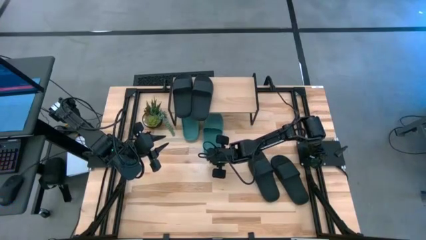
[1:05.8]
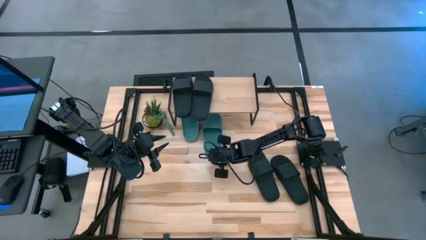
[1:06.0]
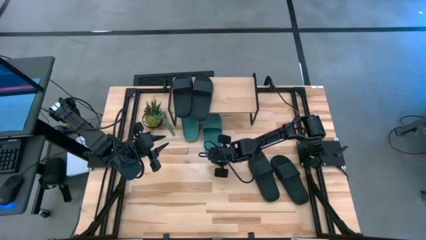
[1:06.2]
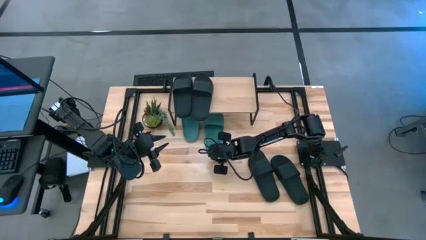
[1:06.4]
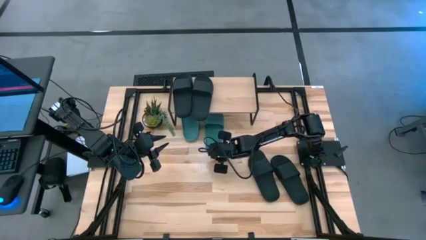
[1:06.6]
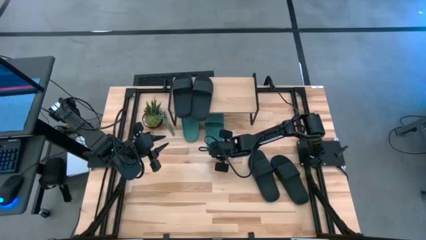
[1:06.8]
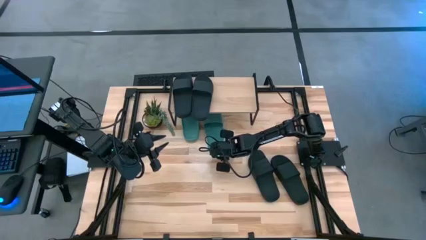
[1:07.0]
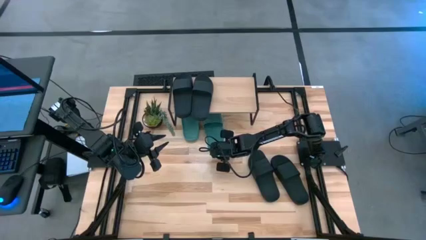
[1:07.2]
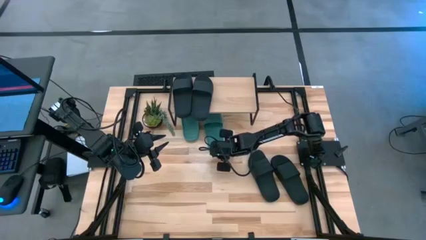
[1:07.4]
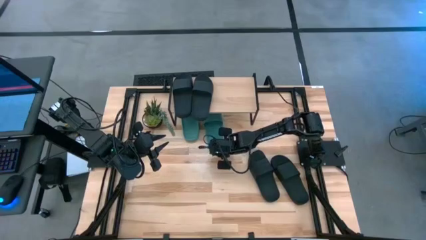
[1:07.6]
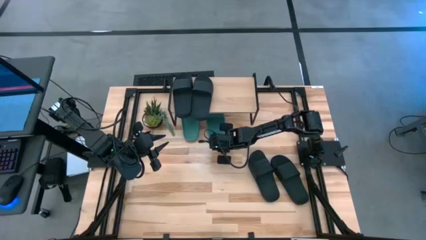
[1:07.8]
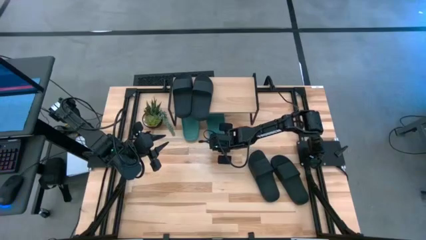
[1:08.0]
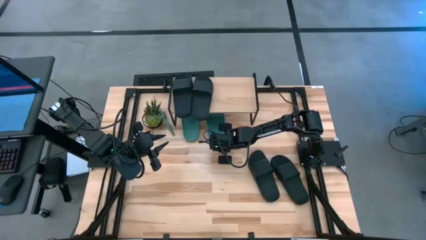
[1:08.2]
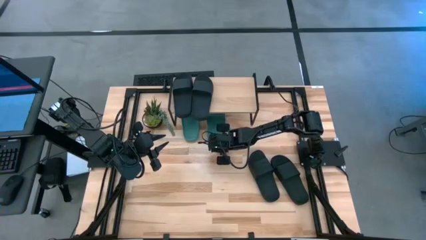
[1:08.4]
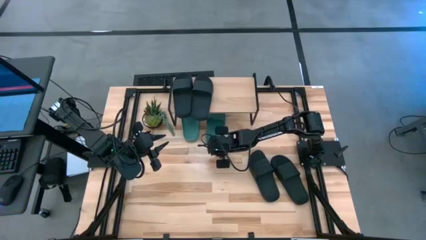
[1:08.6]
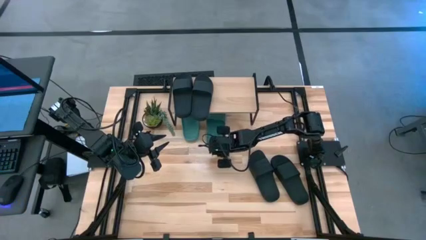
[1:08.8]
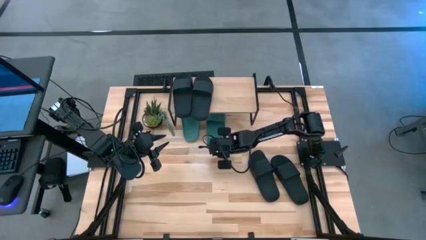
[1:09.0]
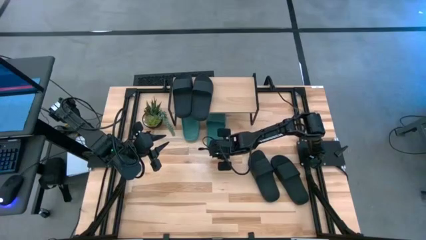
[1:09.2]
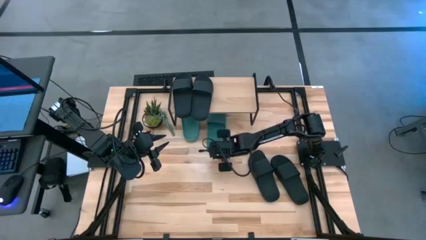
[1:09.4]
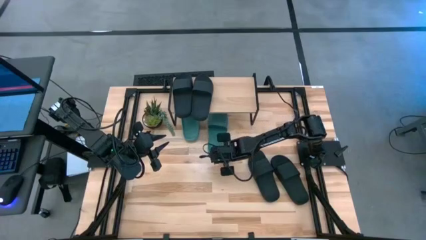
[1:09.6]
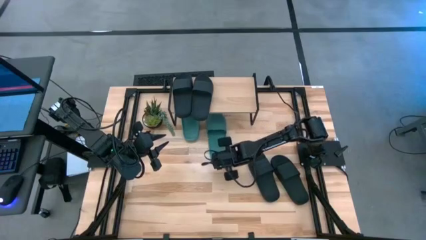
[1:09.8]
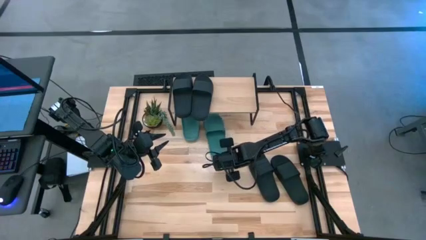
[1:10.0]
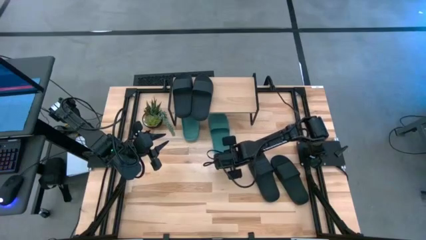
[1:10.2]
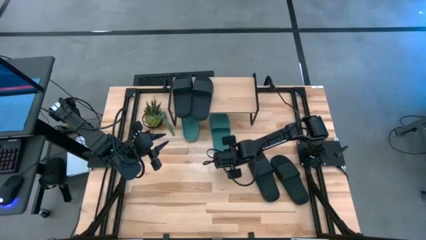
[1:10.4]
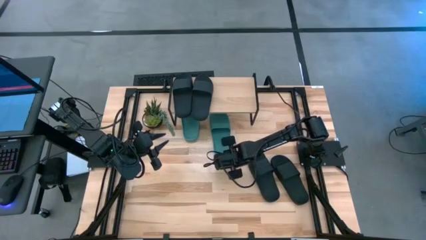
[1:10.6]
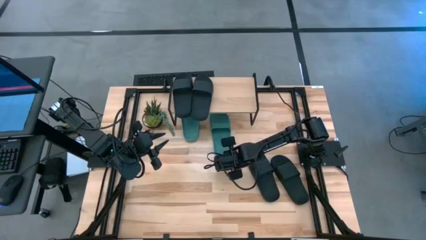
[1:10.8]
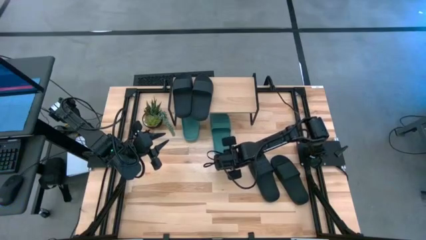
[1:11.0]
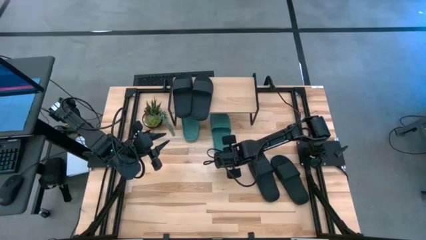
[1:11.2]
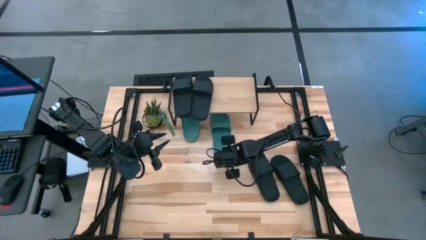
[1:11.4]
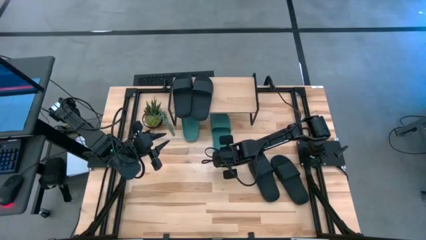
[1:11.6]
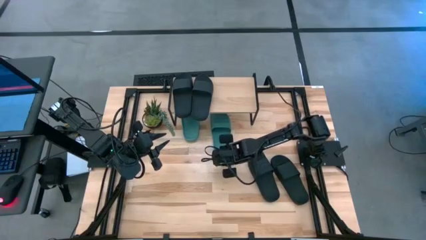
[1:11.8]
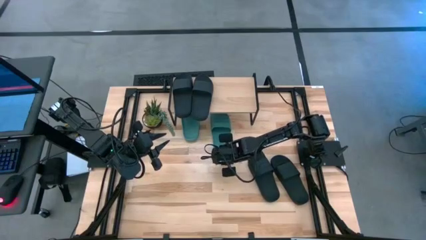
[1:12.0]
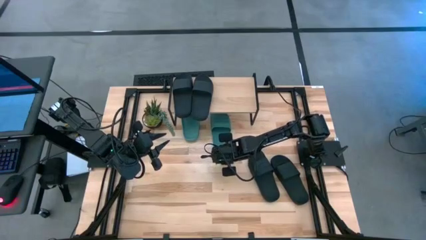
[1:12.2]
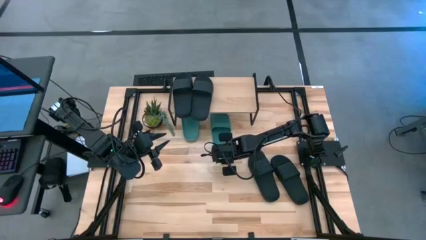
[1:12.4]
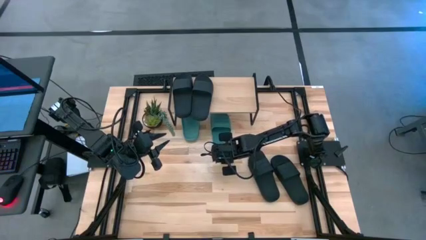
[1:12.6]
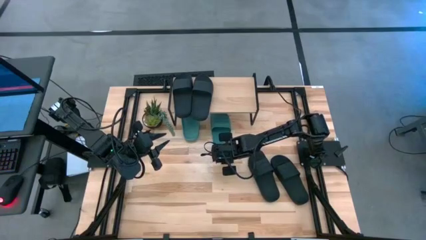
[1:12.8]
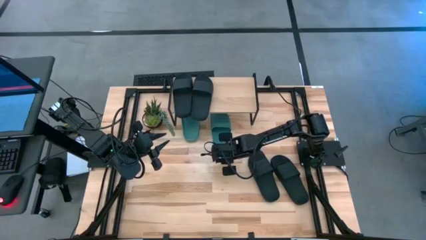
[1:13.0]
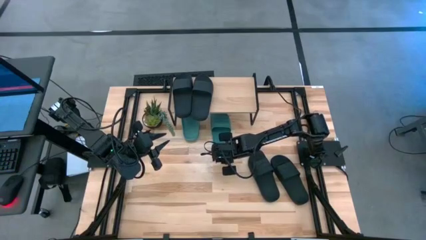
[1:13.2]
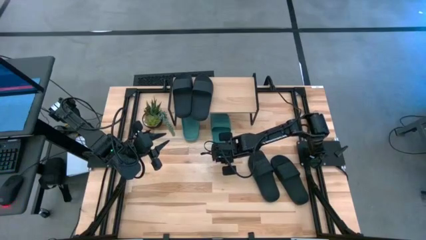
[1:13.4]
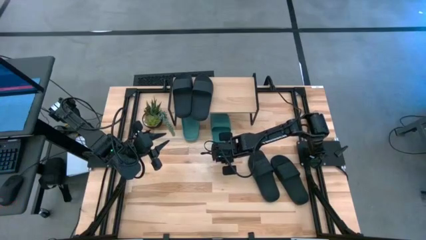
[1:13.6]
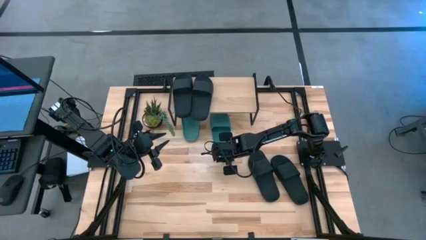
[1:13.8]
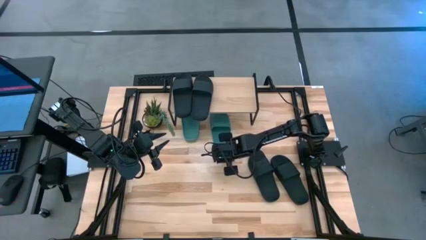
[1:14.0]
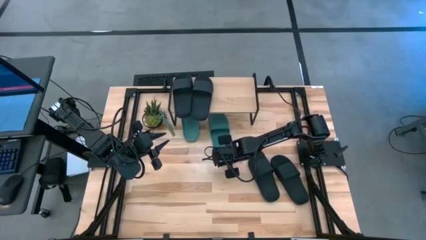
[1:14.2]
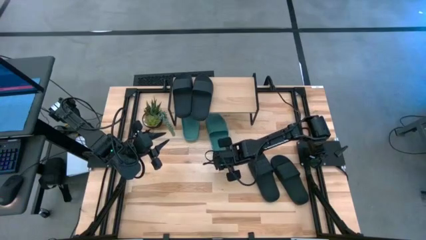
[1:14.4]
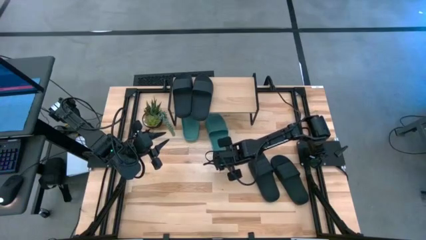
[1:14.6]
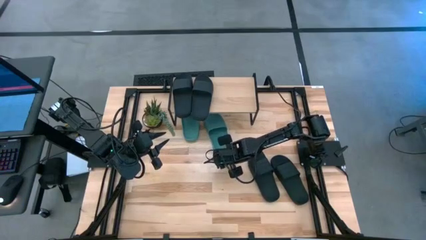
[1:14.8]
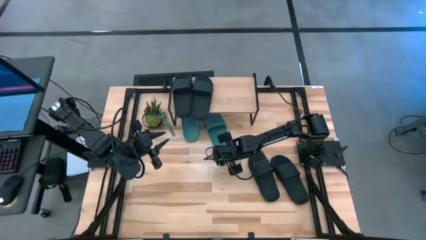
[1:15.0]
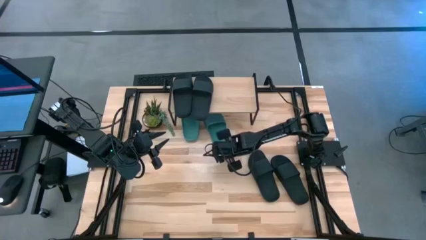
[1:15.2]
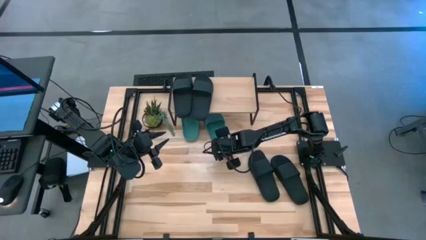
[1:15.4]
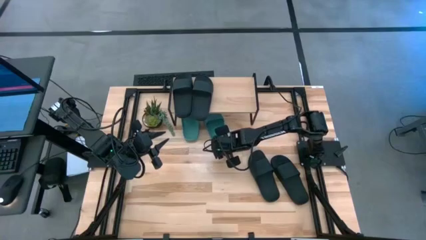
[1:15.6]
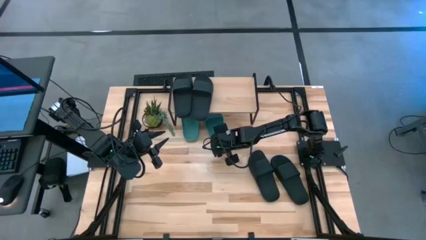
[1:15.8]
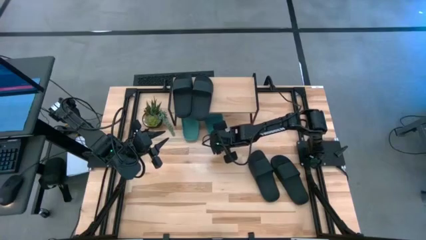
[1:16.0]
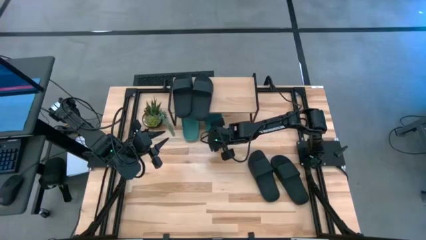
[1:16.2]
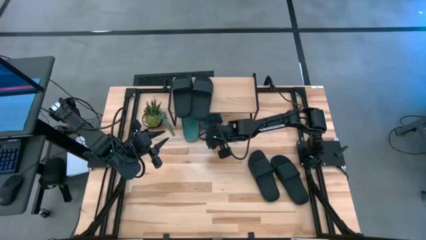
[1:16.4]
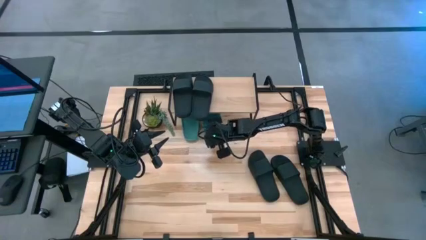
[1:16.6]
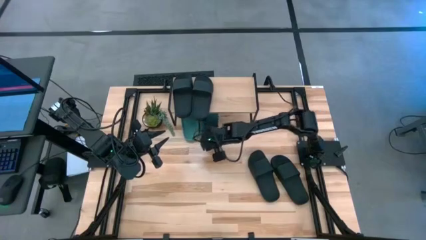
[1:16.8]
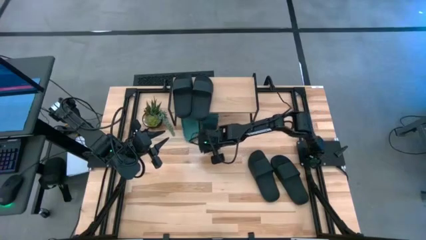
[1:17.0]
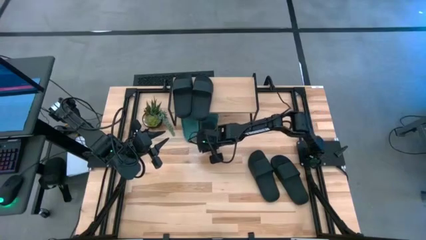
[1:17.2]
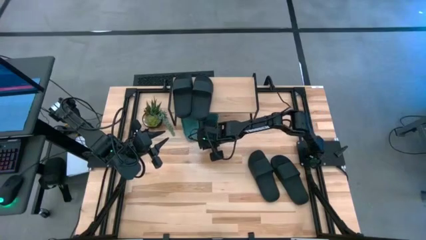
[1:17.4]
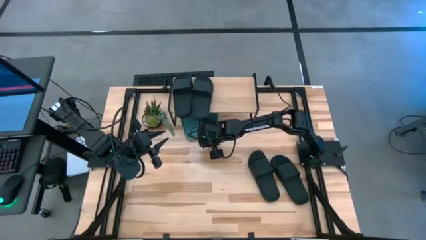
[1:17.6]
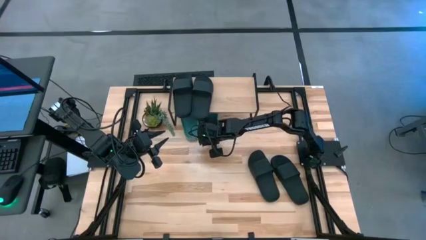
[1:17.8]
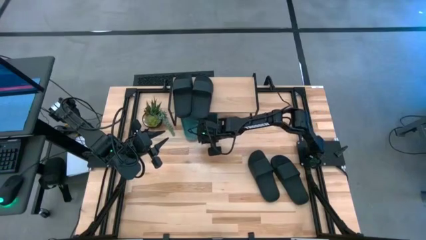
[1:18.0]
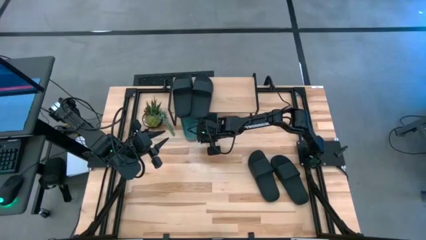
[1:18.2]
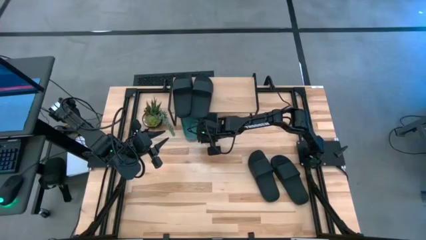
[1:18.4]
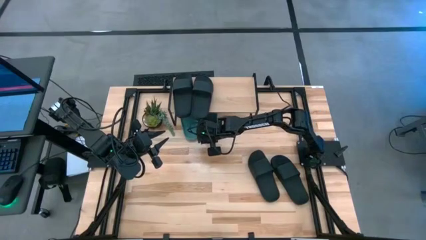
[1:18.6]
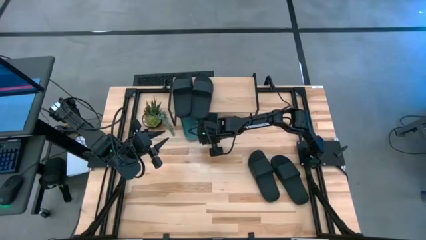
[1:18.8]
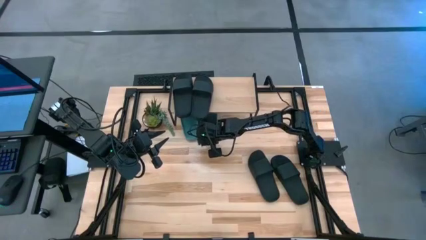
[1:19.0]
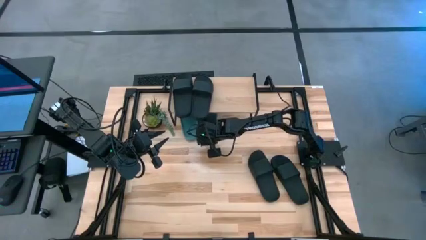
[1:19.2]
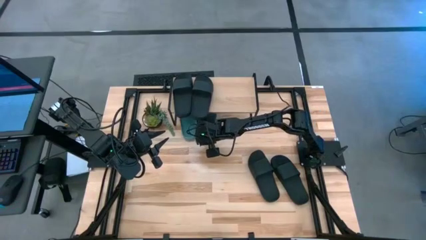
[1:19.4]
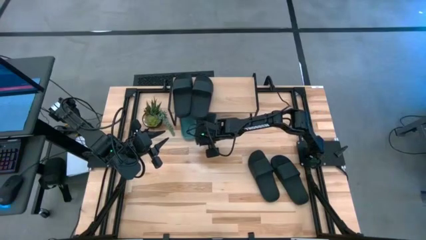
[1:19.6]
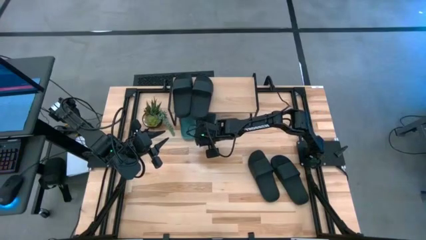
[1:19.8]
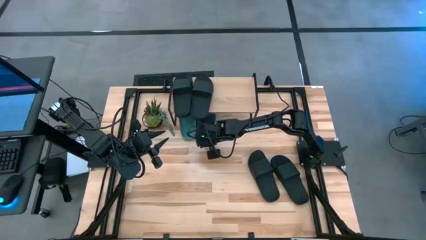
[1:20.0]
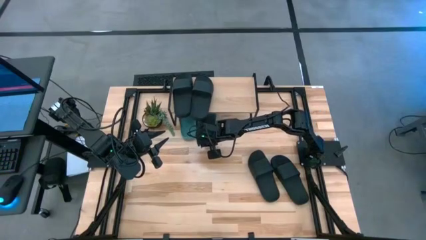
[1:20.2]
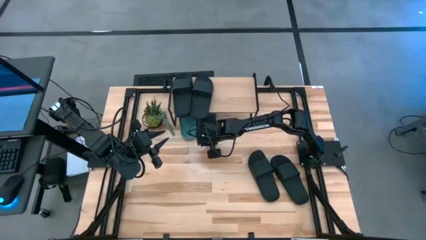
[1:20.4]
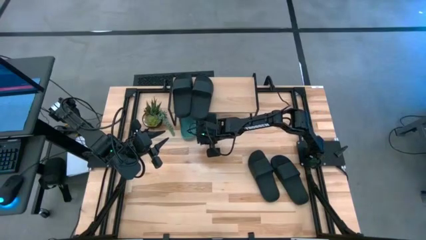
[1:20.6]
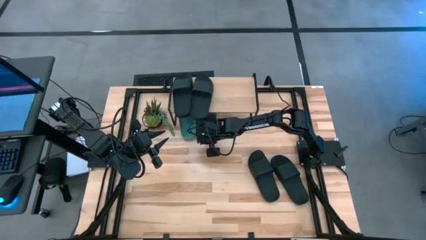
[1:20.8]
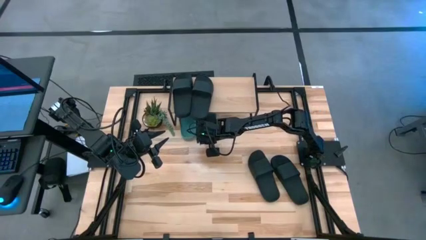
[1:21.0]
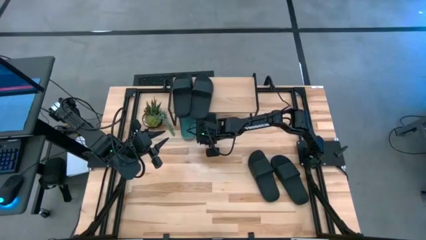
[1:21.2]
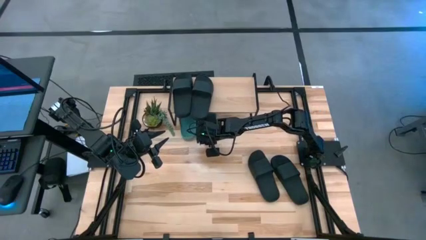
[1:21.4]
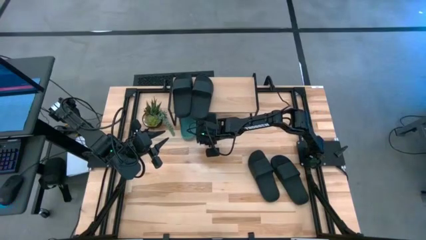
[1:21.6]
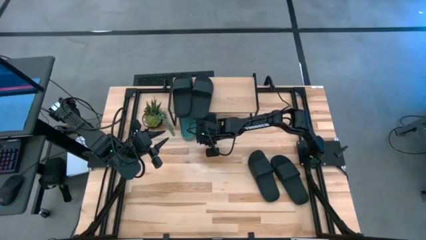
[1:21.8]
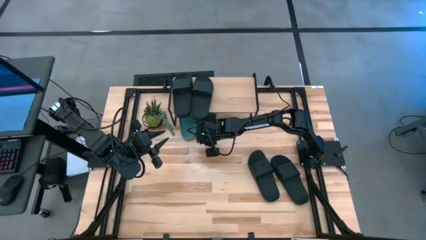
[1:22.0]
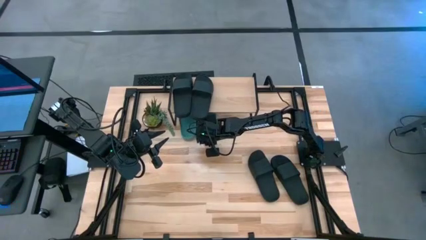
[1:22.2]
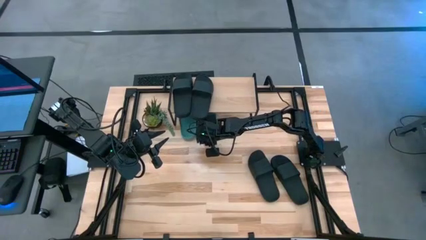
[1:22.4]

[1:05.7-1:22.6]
Task: Pick and place slides into the shelf
Put the blue slide under the shelf
